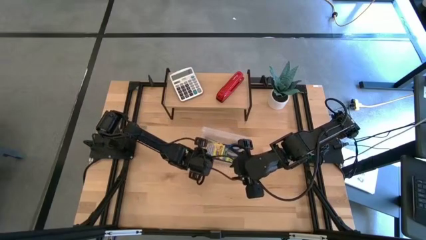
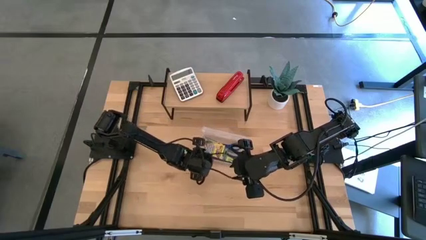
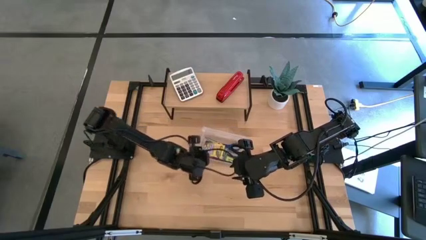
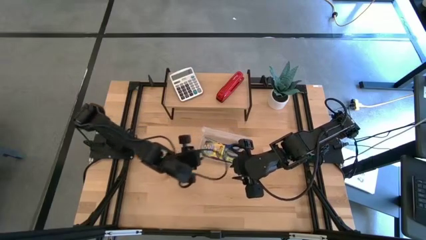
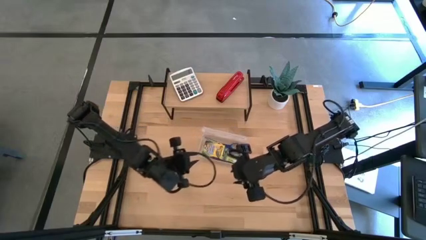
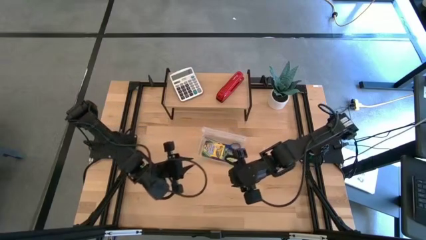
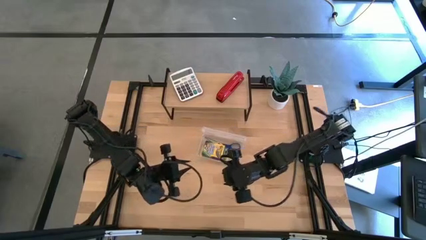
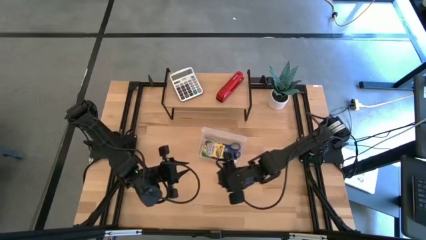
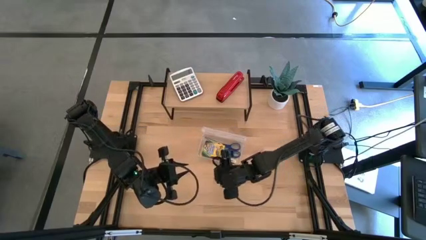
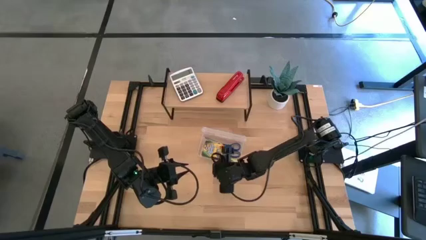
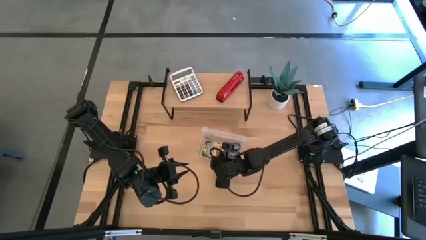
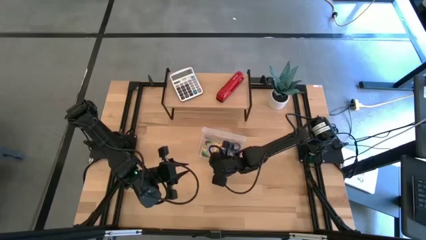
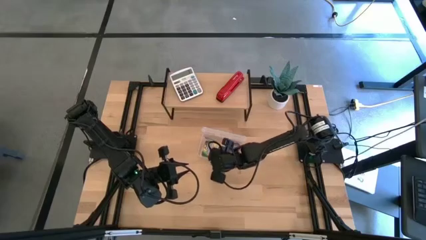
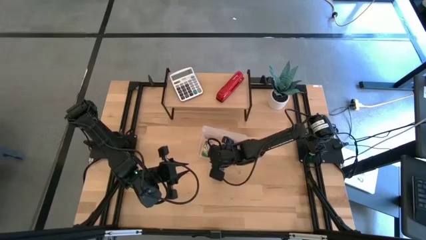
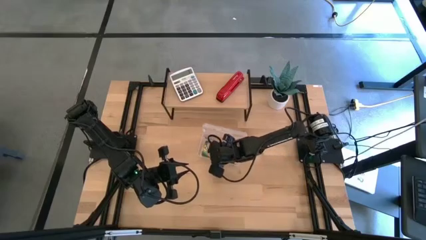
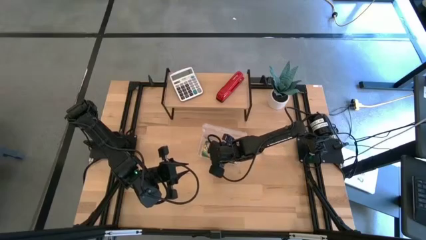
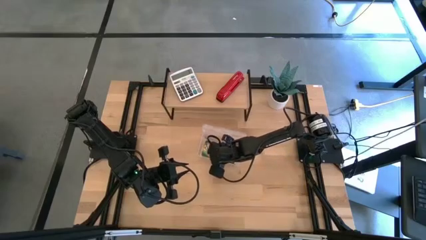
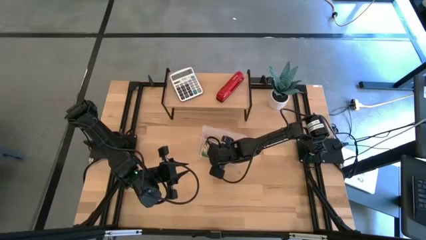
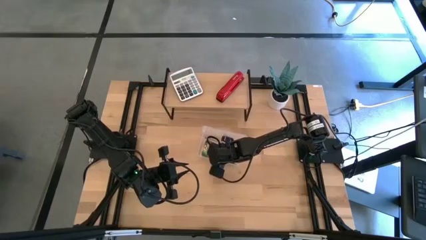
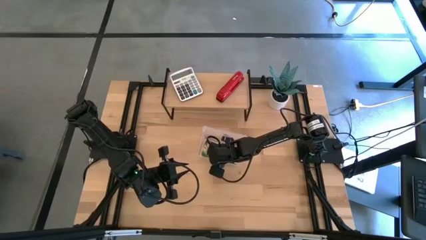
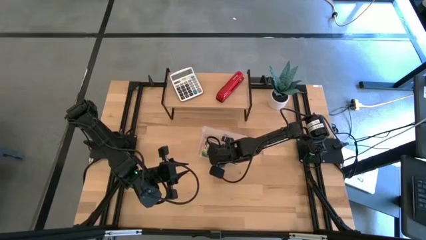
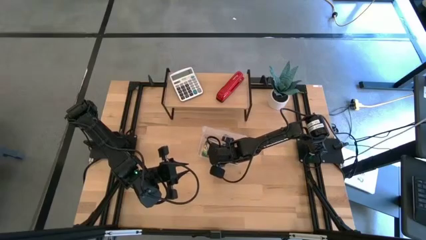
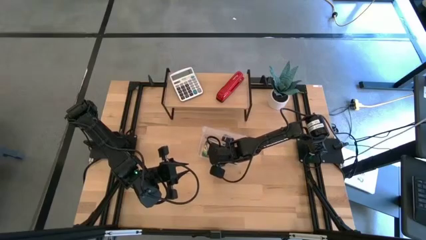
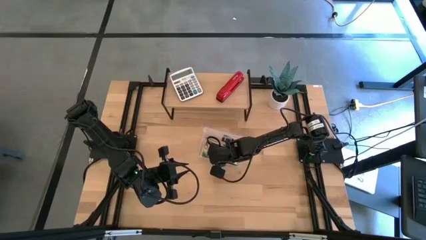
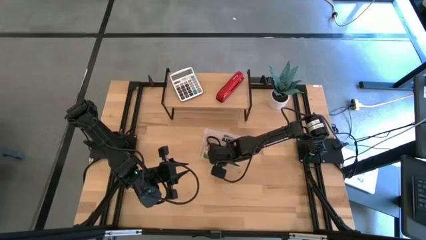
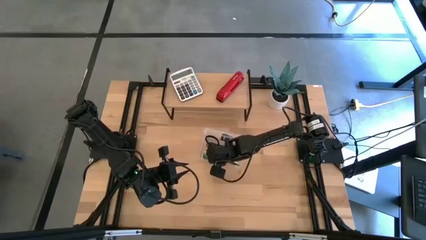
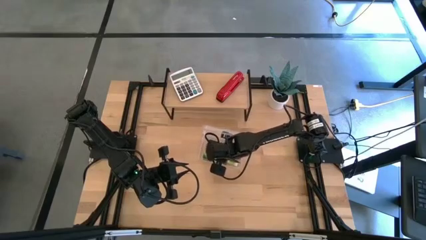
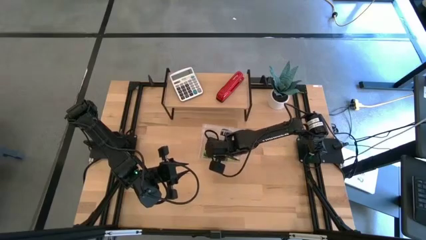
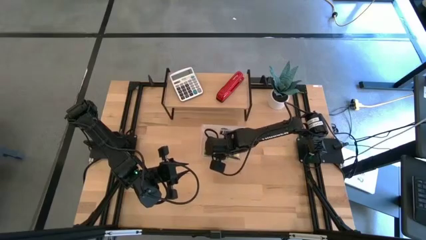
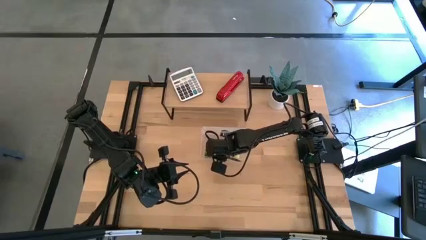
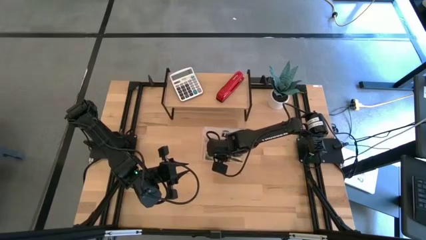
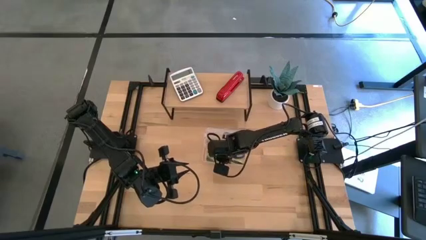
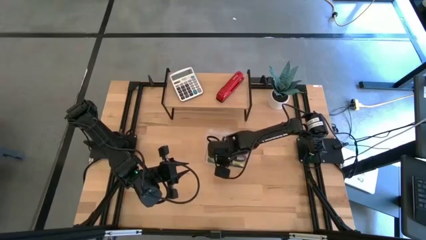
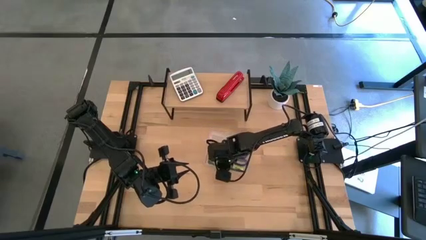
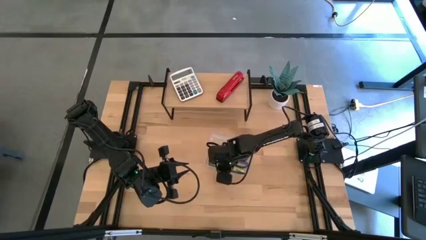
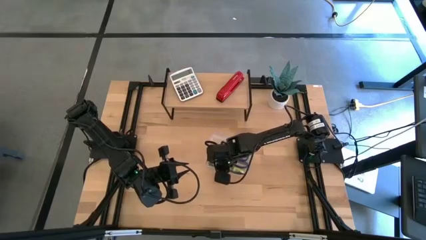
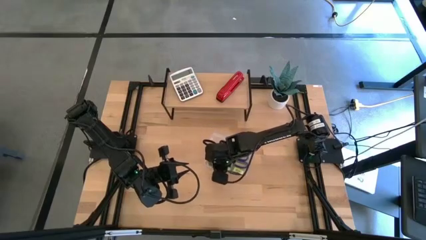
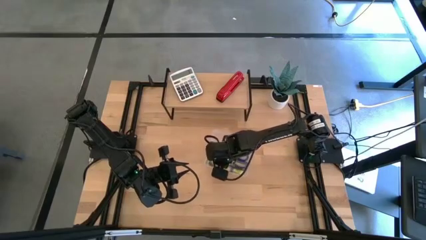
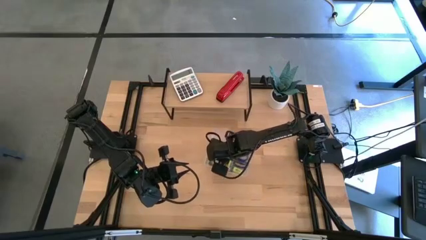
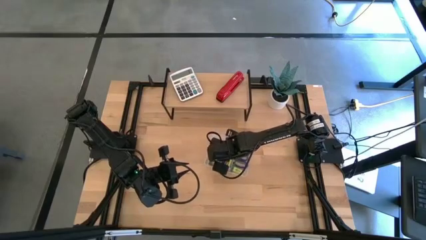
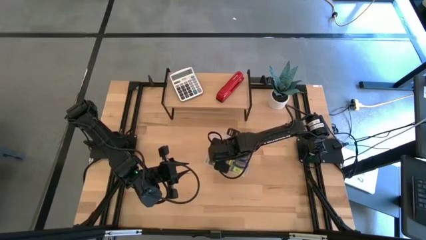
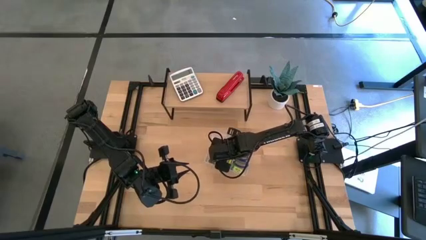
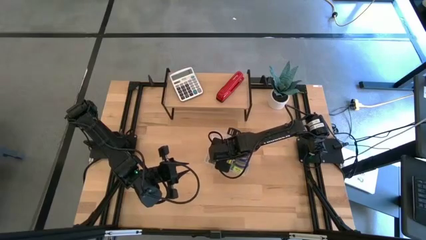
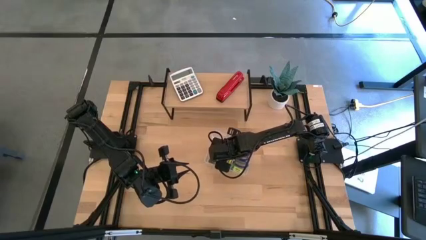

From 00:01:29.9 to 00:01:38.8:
Task: Pack school essentials
Adjust the purple pen in the transparent supply box

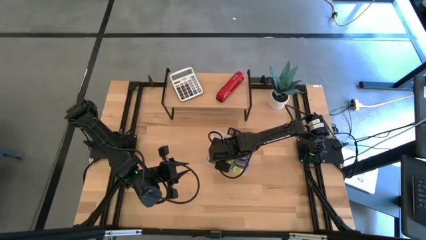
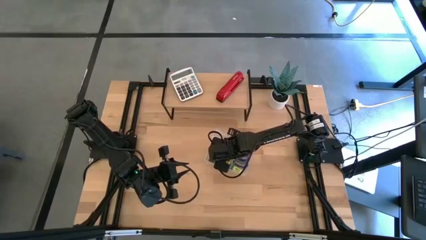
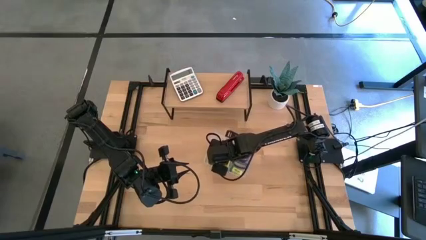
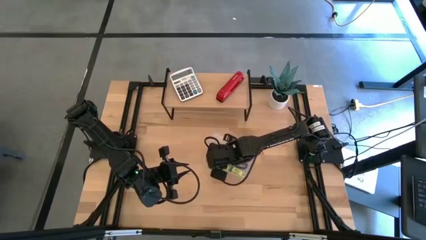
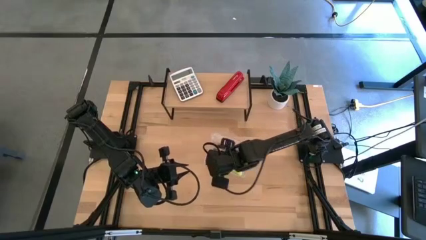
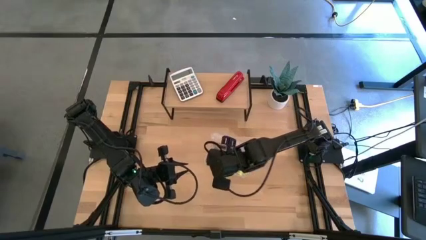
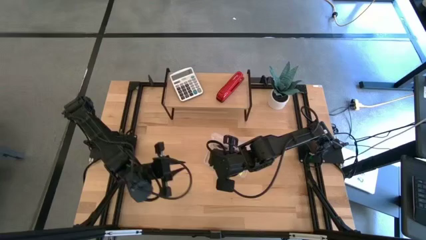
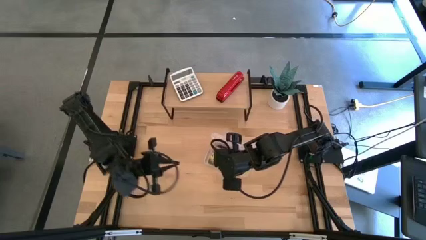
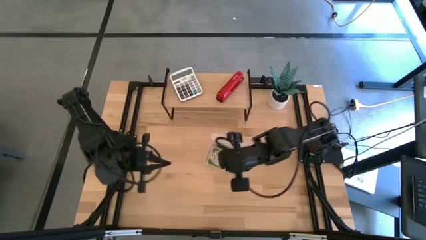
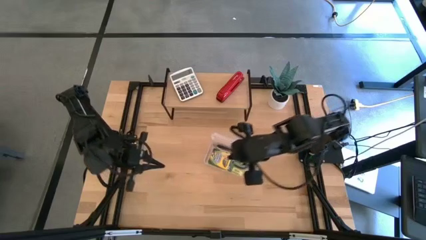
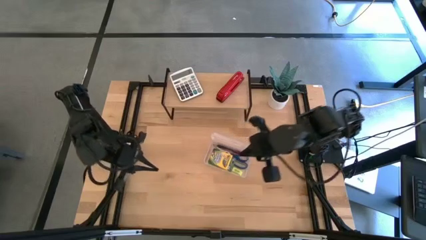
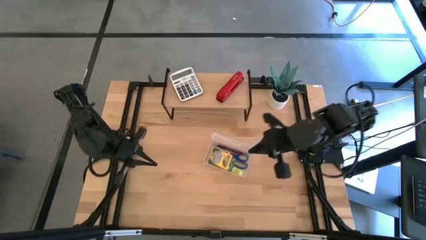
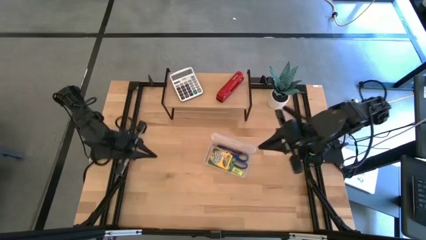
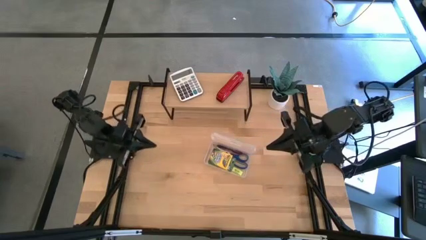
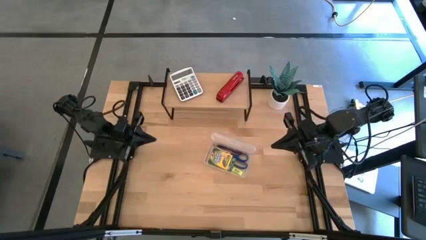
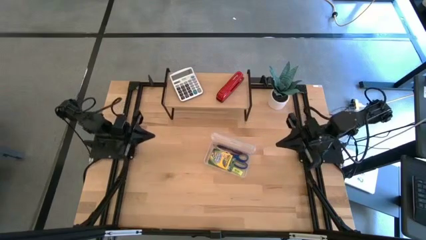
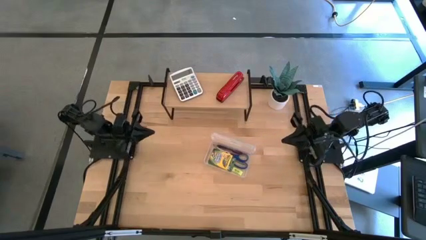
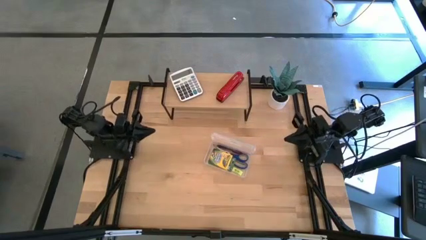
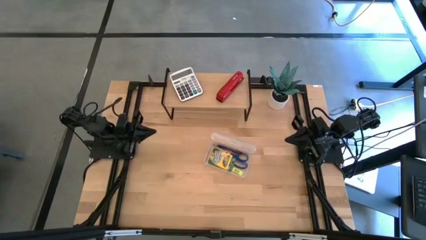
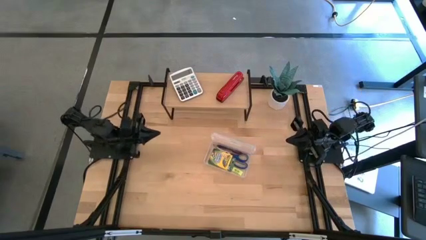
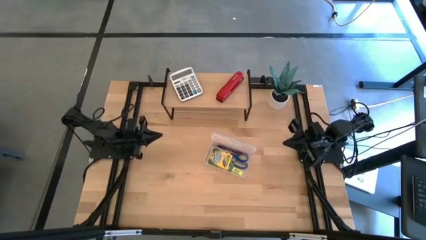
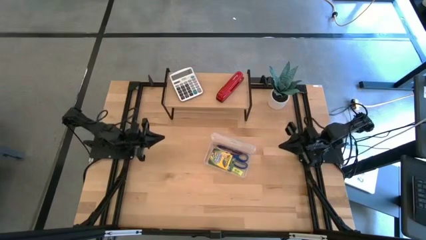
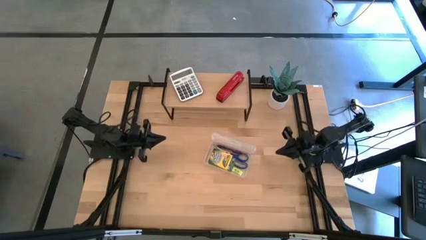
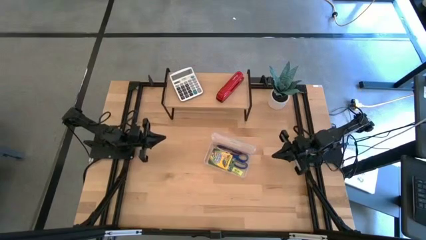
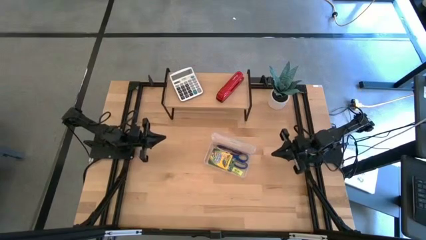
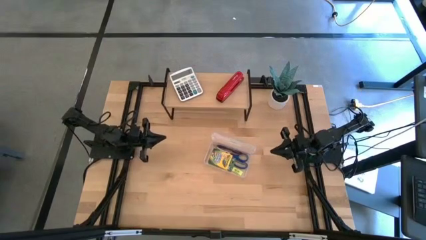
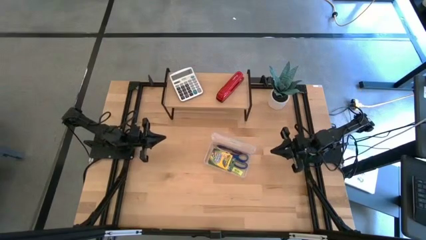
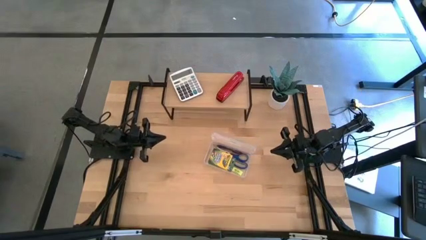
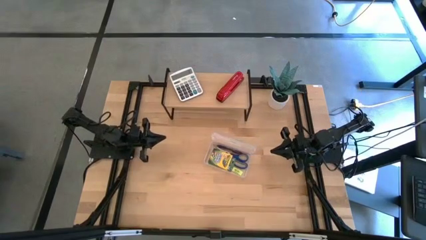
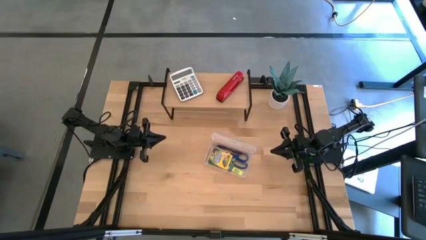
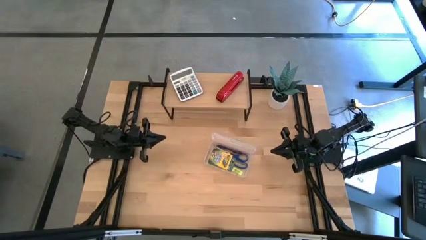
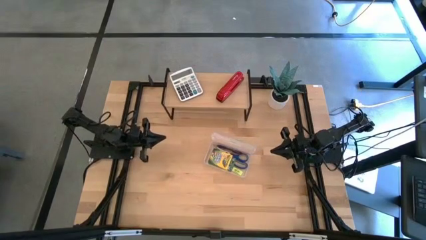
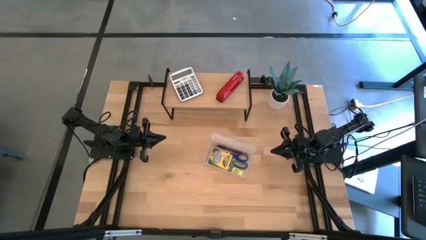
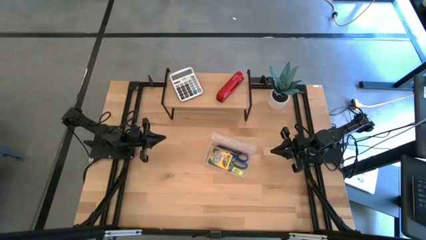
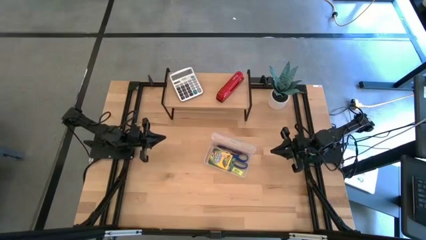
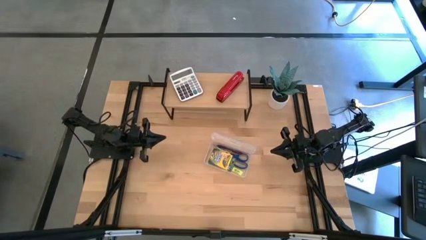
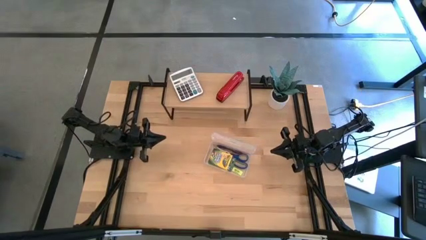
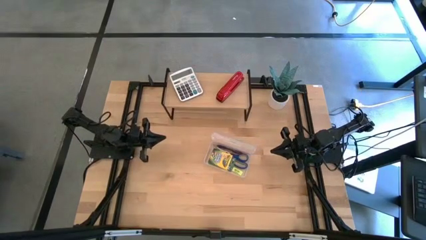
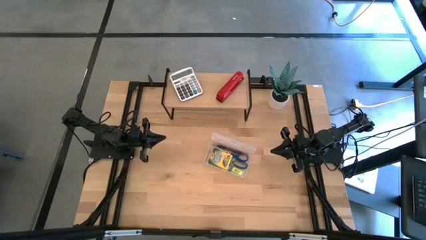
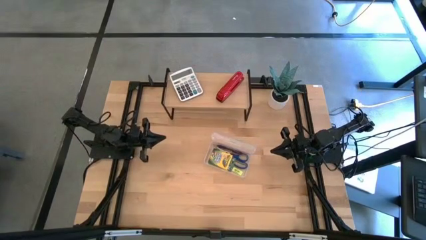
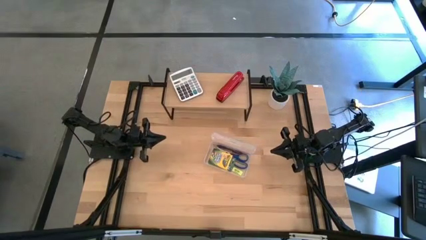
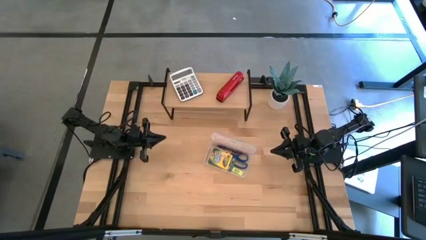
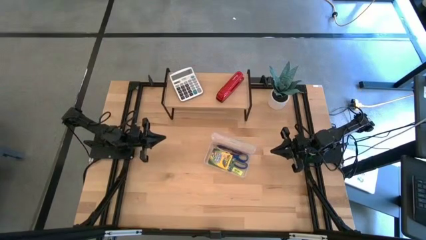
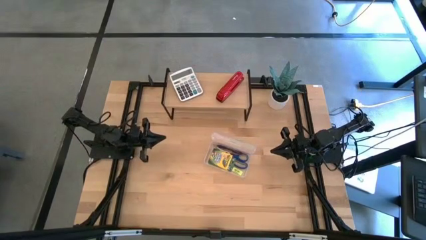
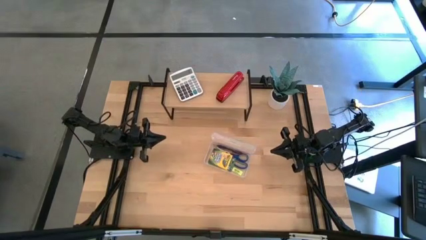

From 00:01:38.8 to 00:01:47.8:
Return to Home Position
